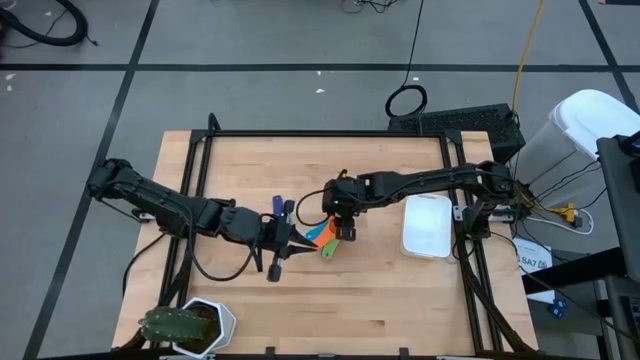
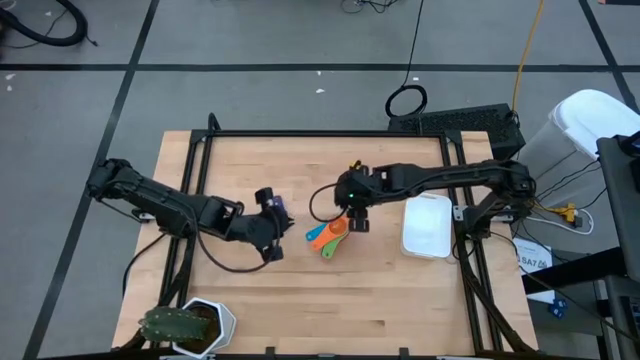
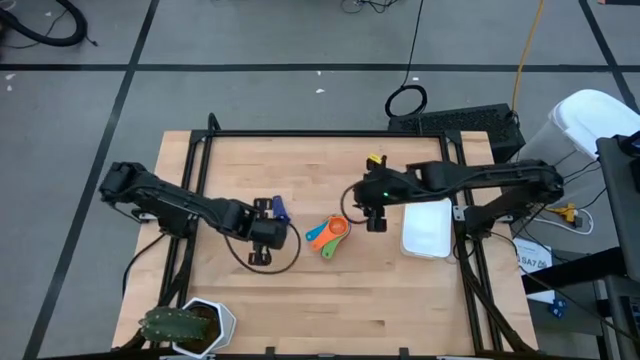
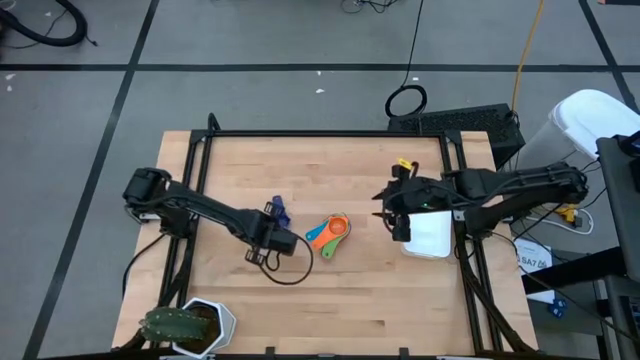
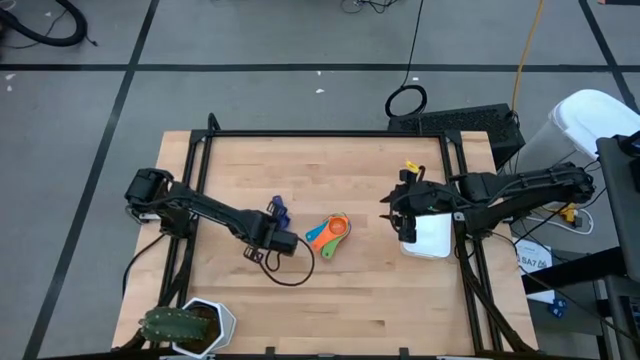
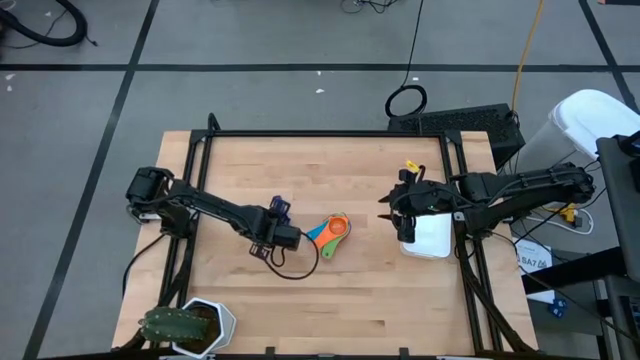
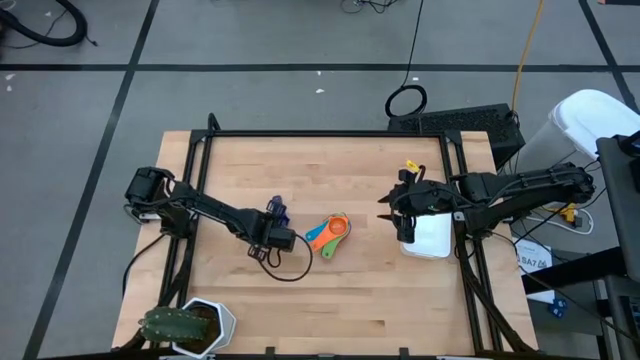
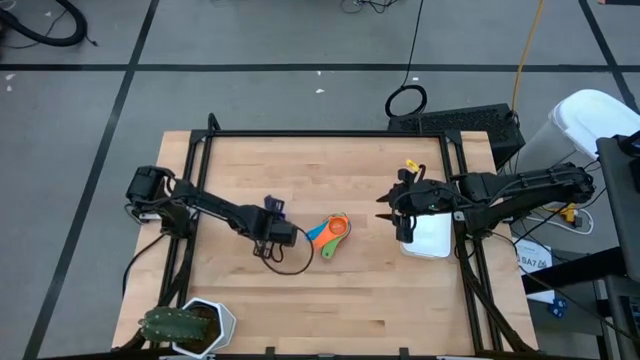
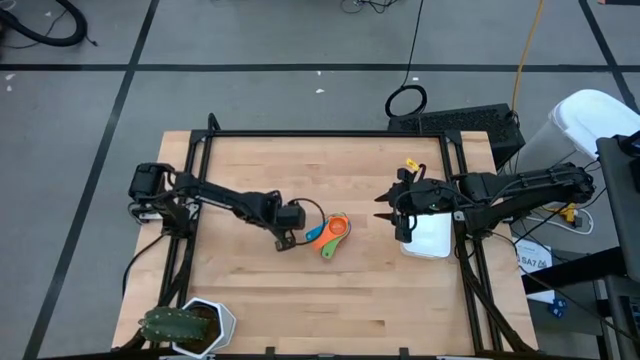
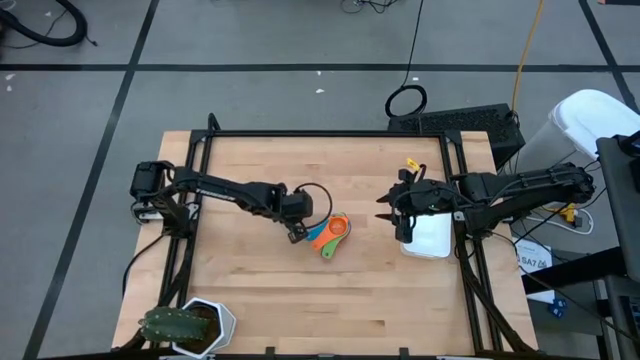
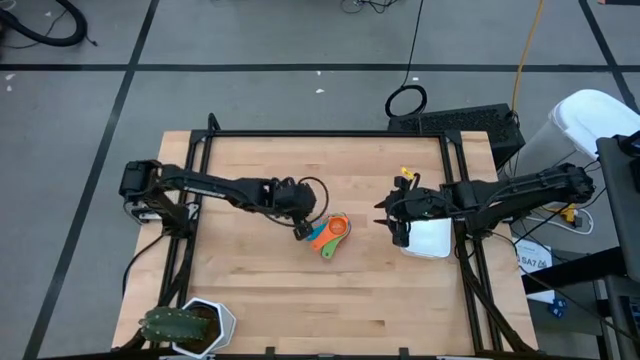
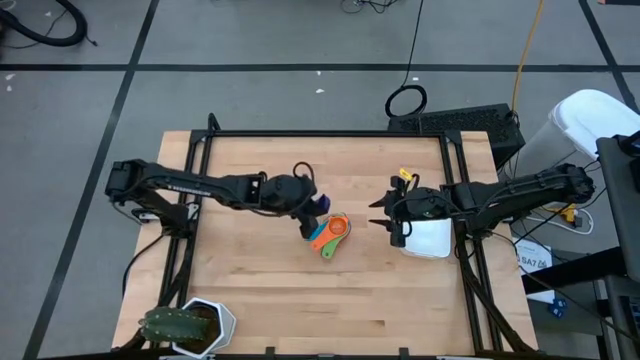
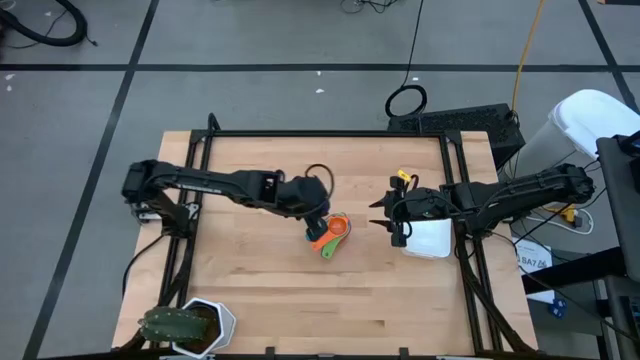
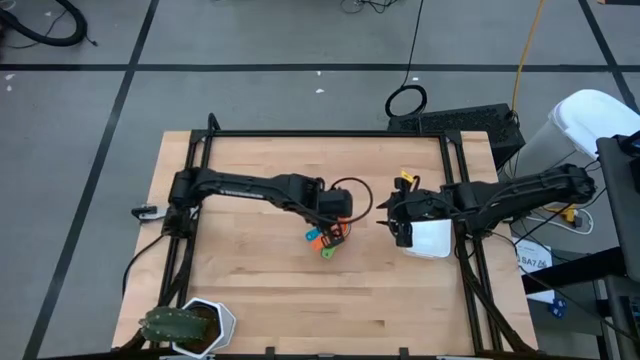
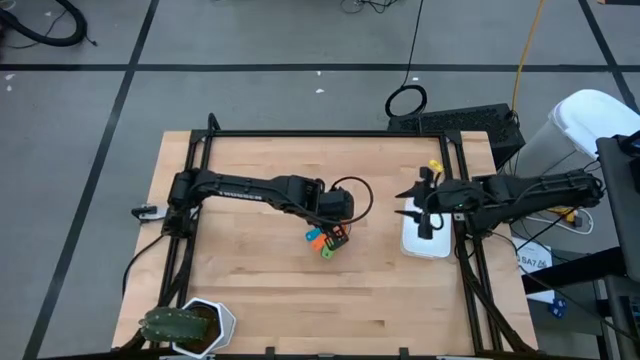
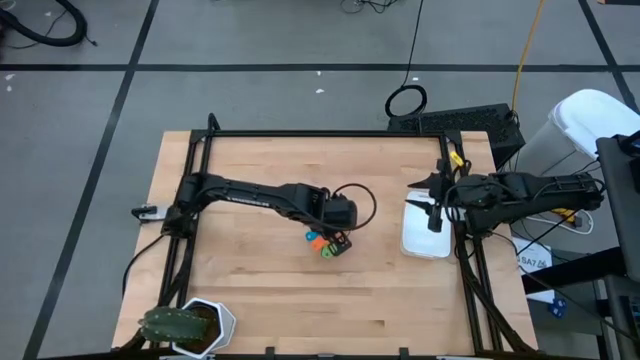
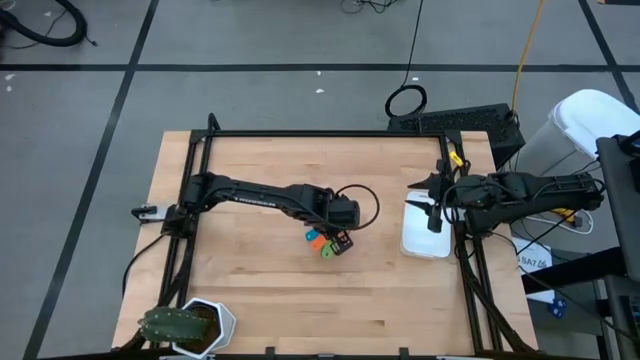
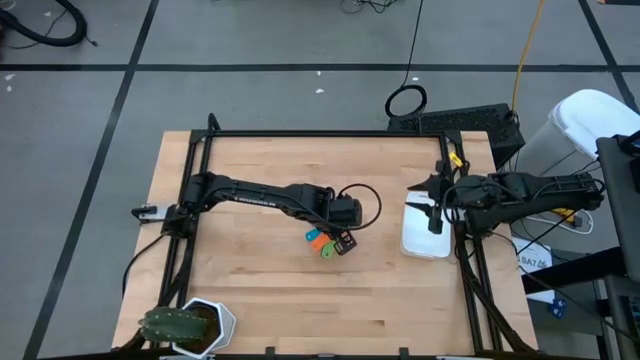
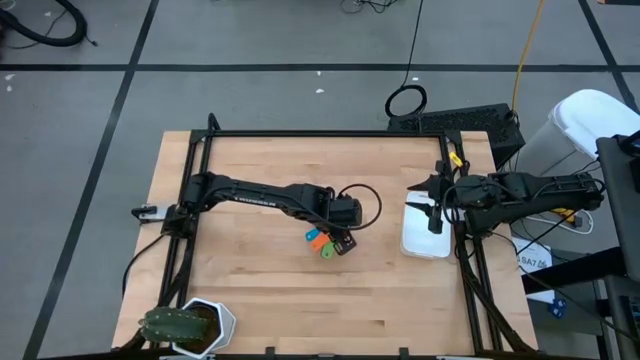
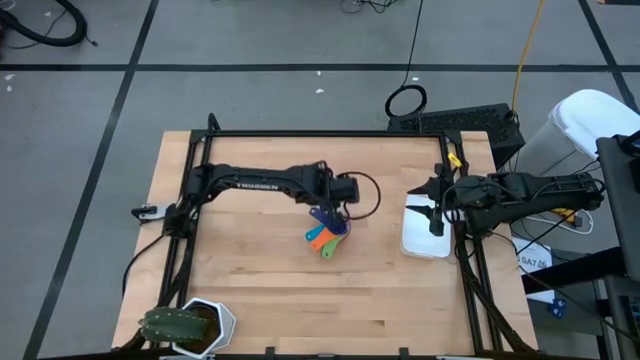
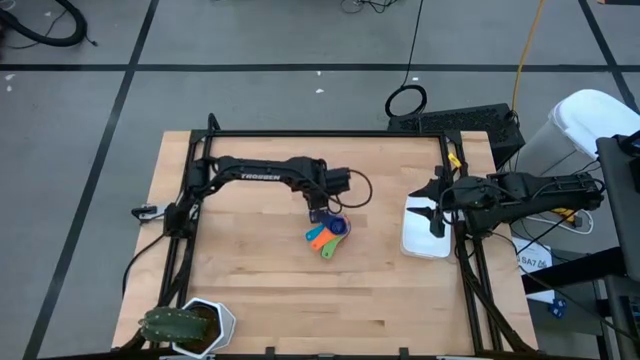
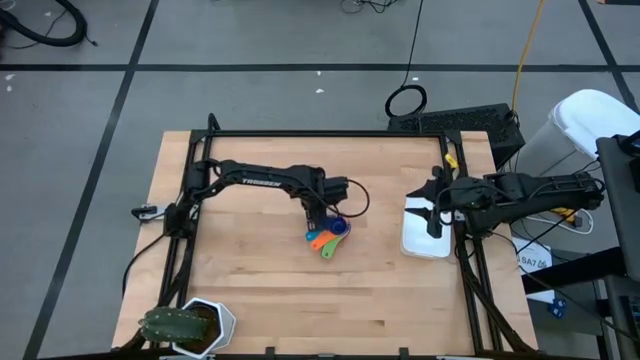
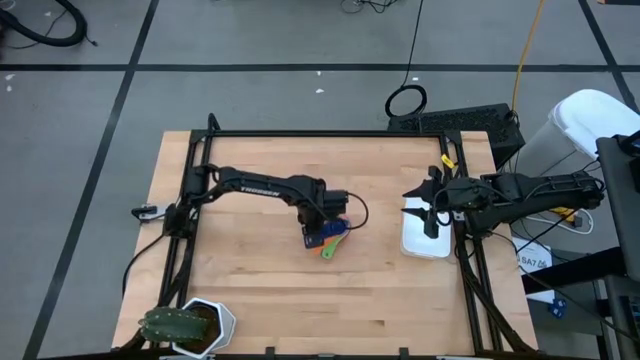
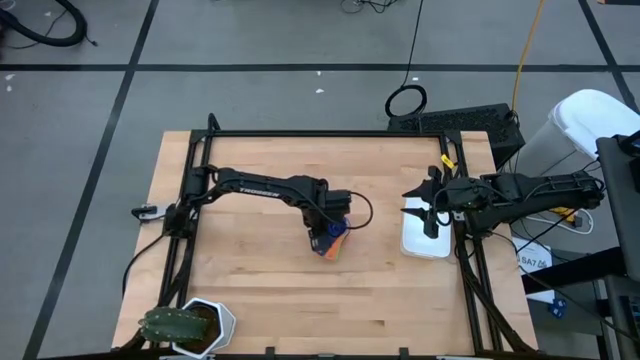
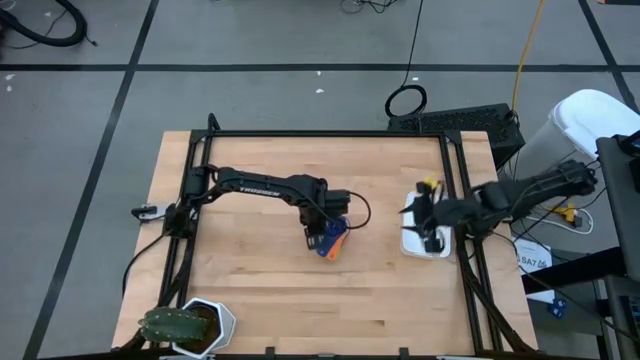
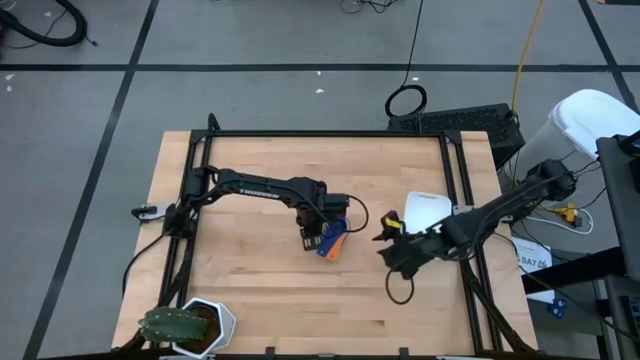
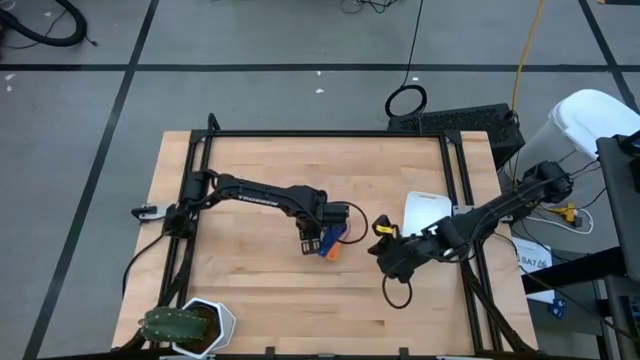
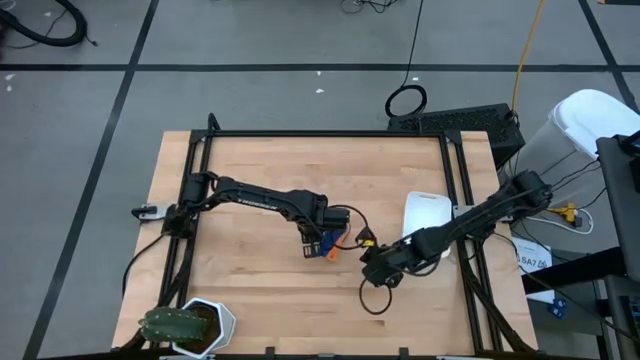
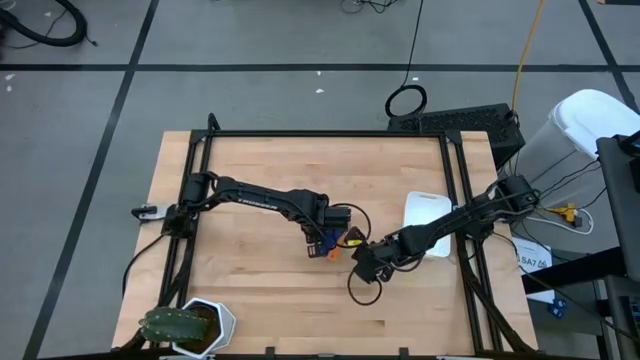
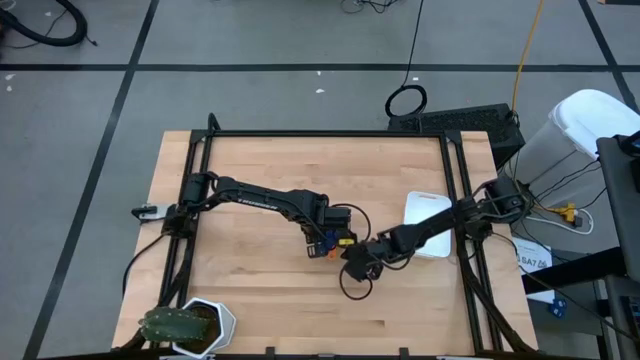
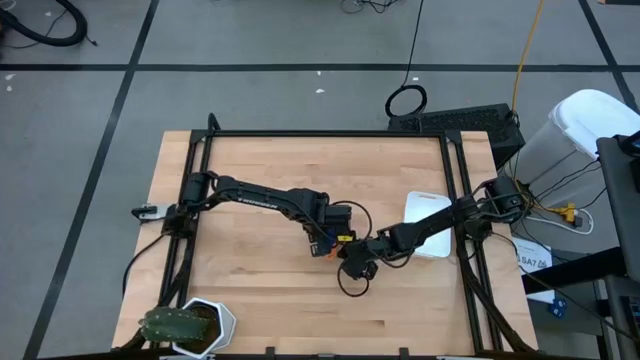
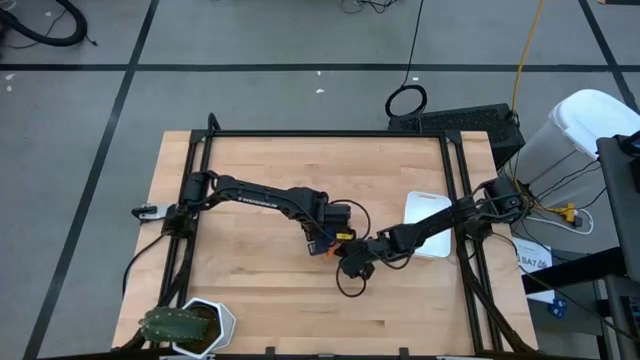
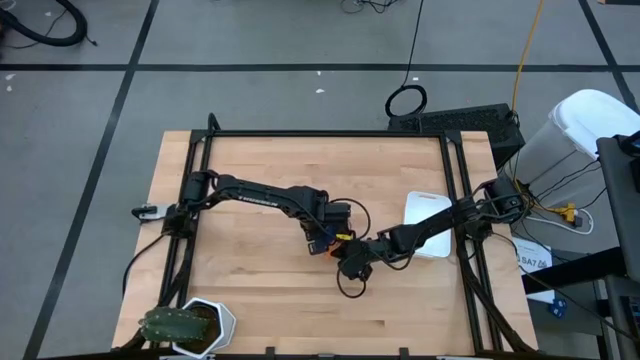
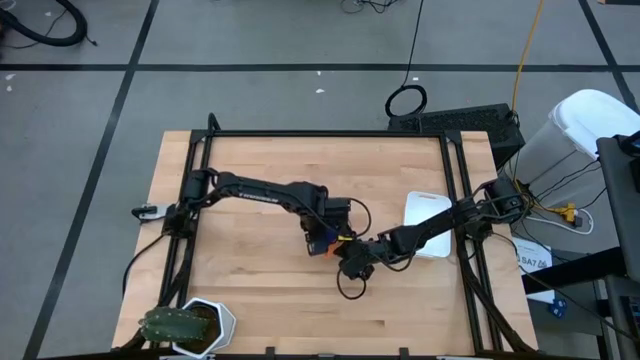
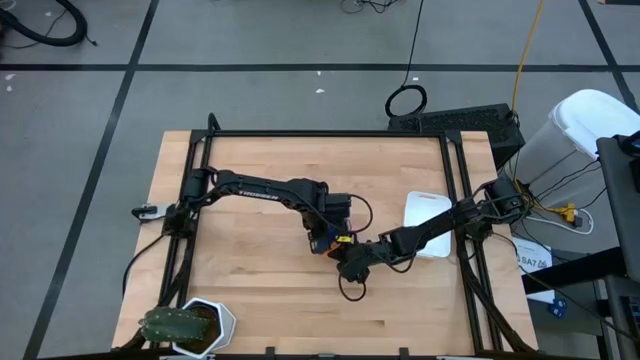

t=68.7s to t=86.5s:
Task: Nest measuring cups in basket
Stack the dark blue measuring cup on top of the orange measuring cup

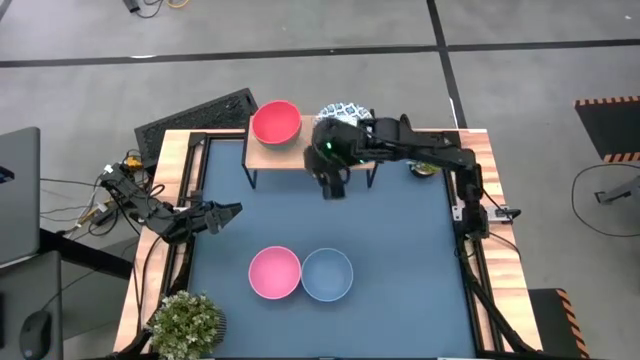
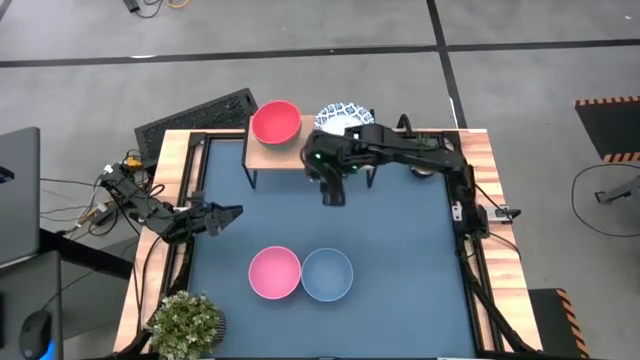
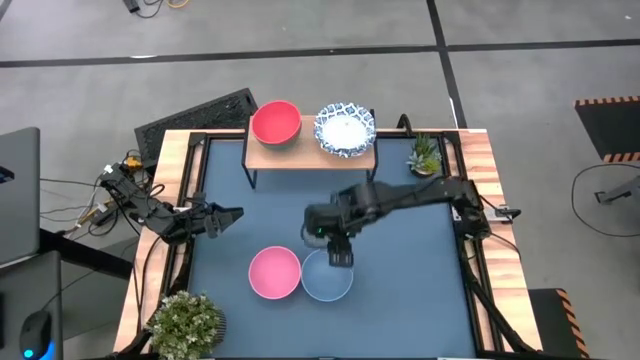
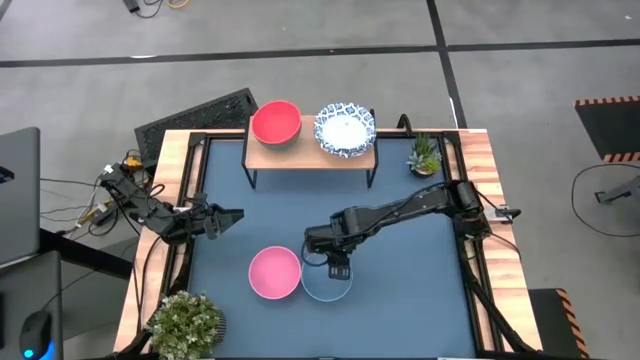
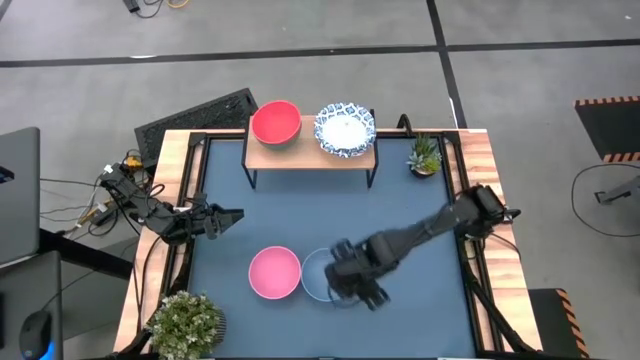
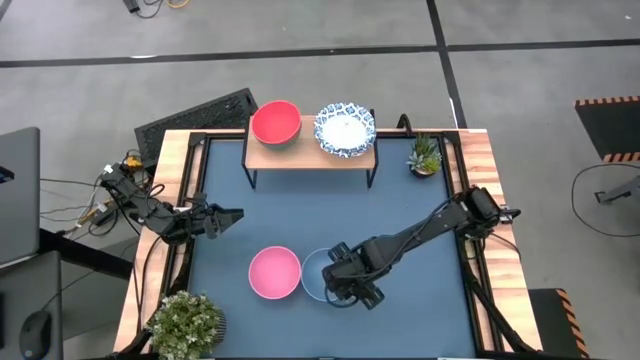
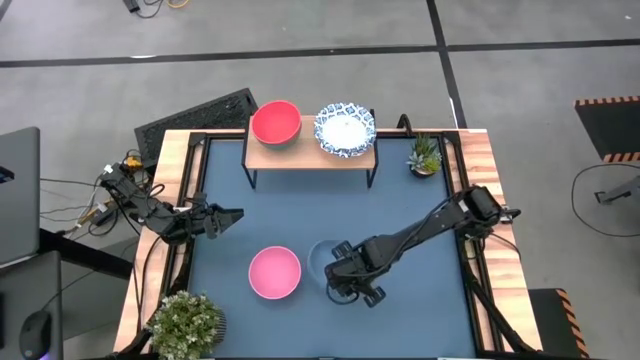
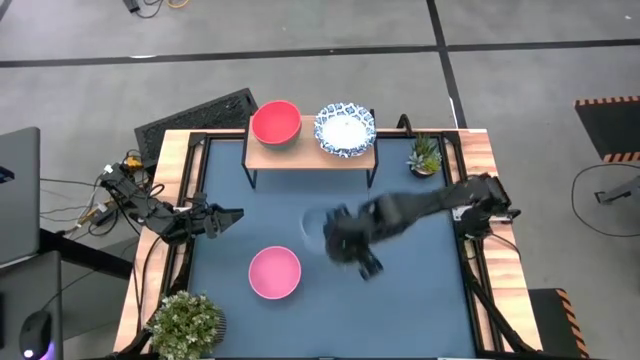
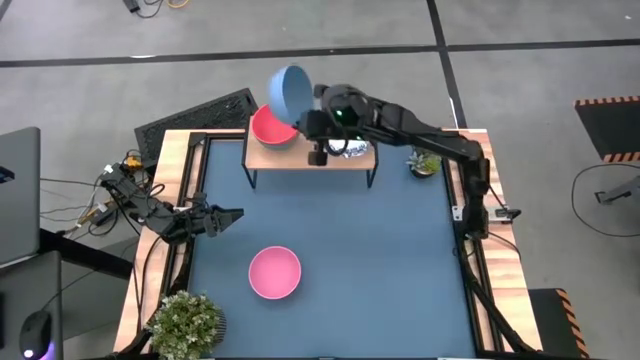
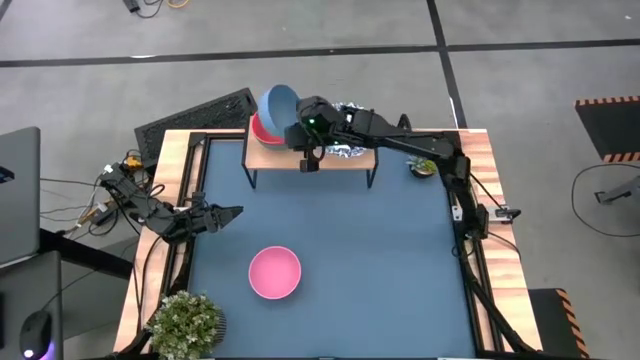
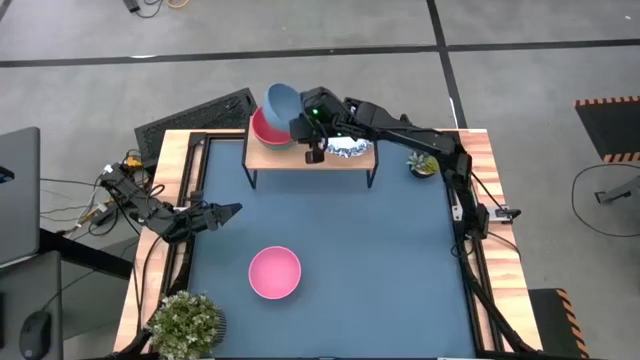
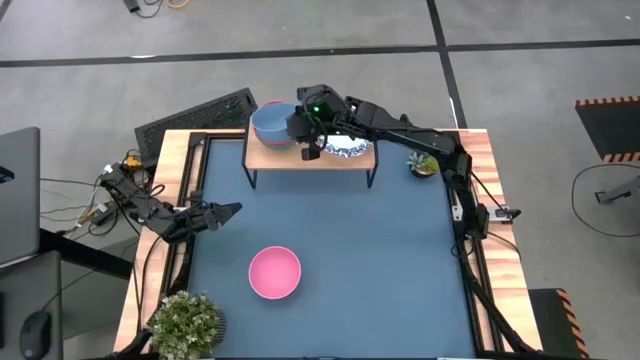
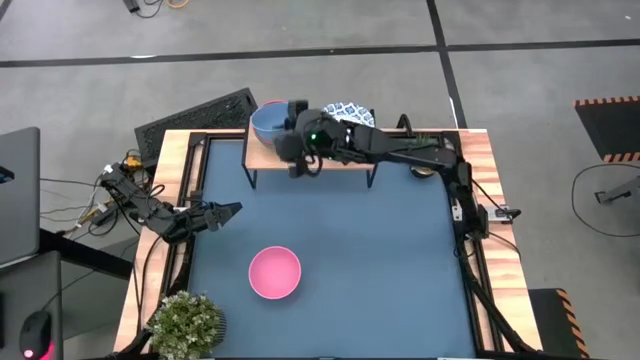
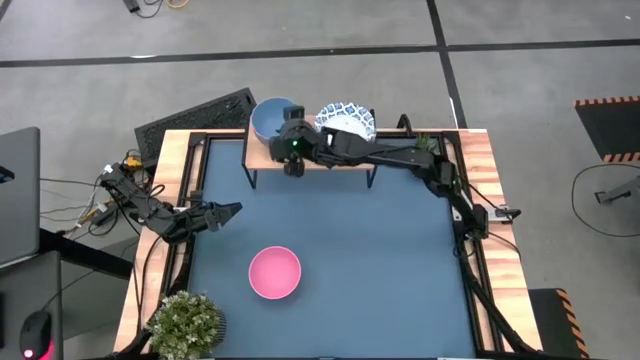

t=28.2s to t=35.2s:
Task: Place and stack bowls onto a shelf
Stack the blue bowl on top of the orange bowl on the shelf
